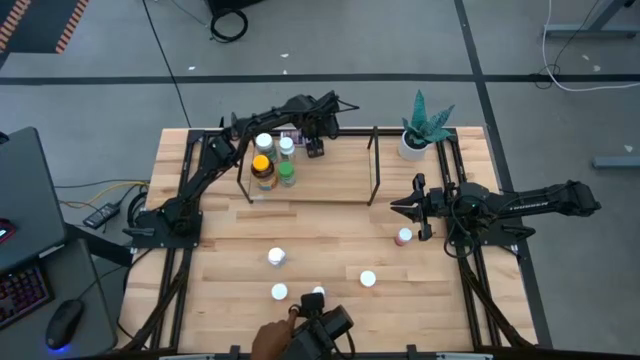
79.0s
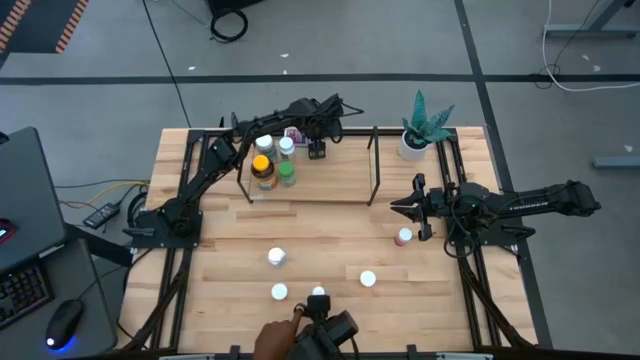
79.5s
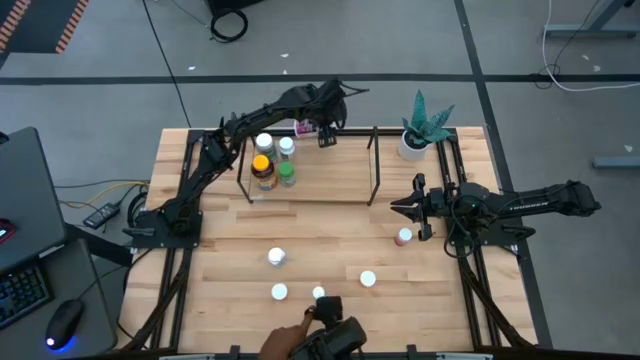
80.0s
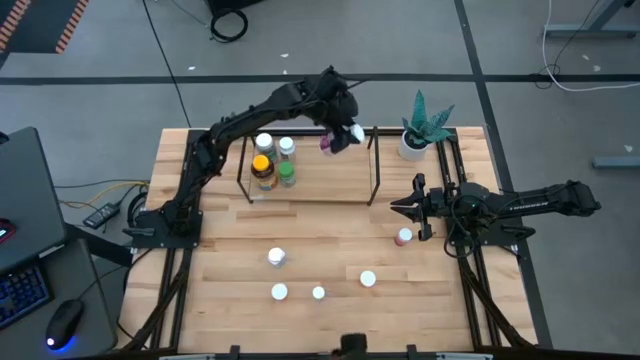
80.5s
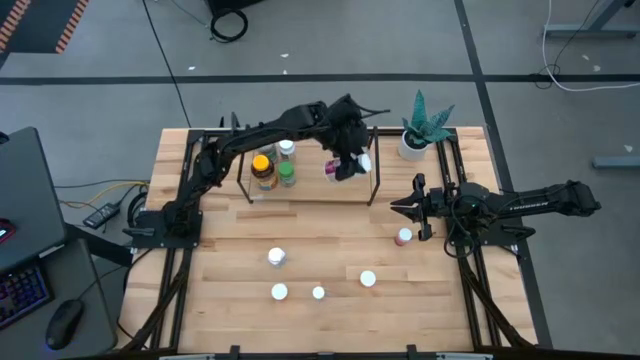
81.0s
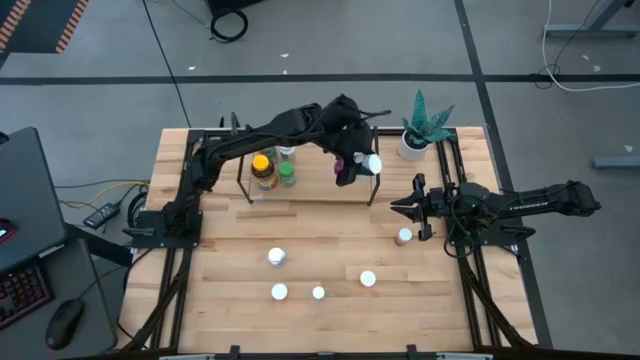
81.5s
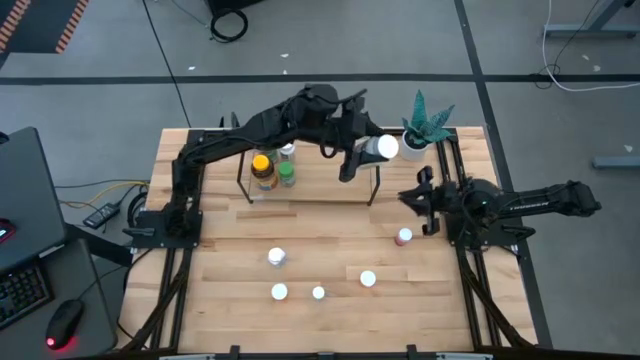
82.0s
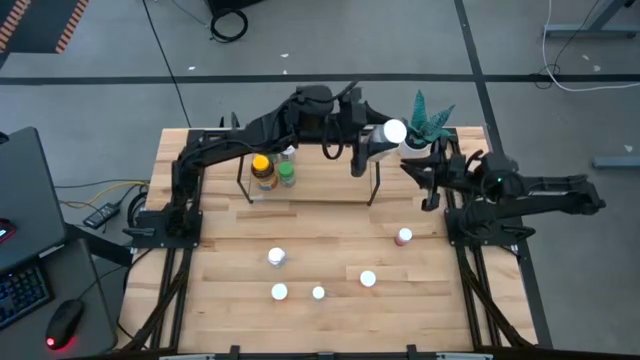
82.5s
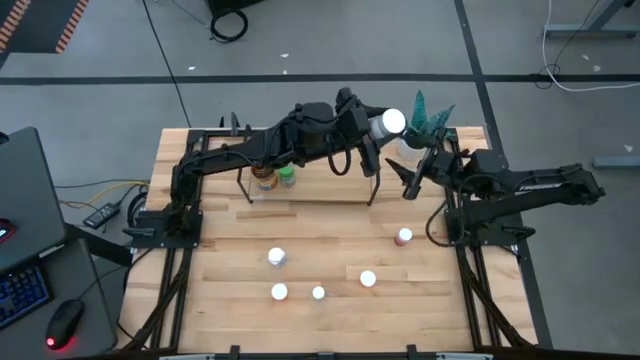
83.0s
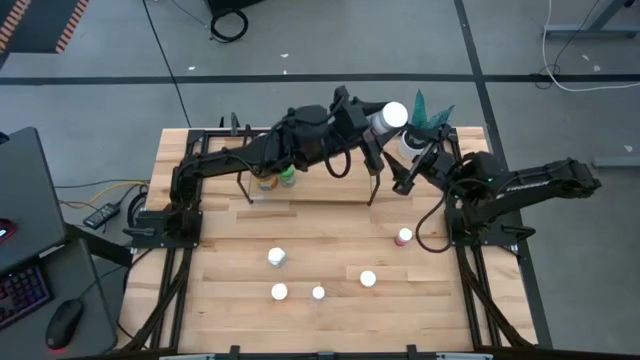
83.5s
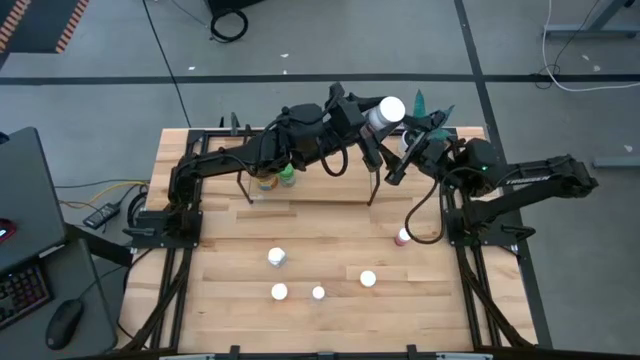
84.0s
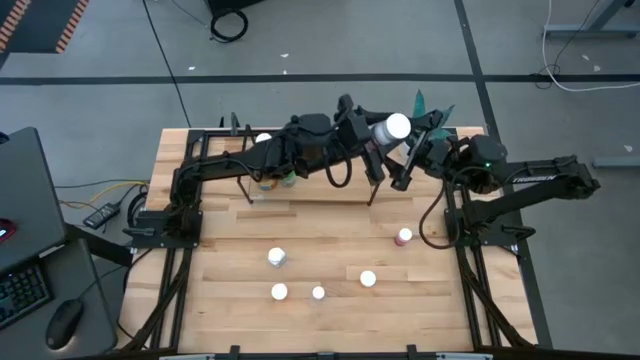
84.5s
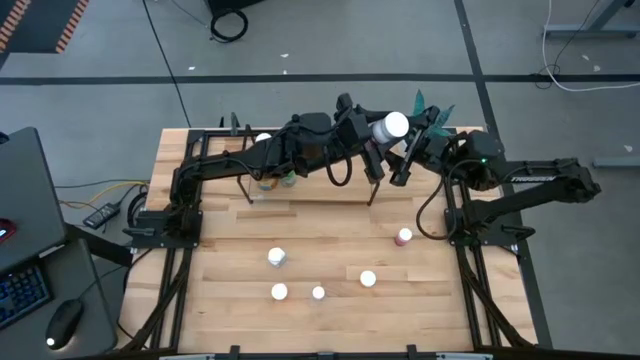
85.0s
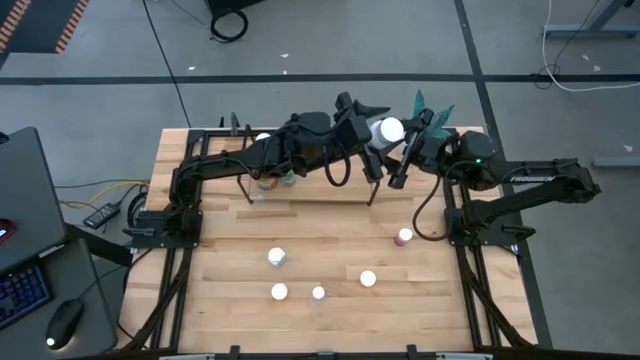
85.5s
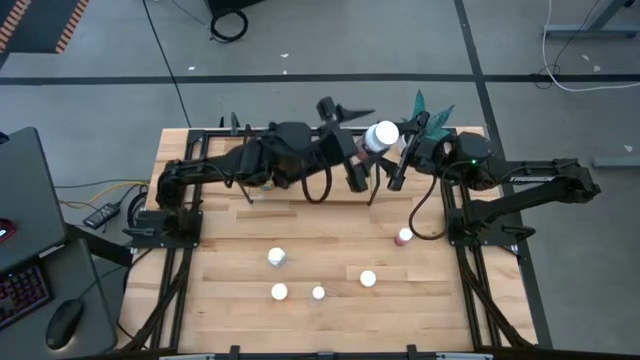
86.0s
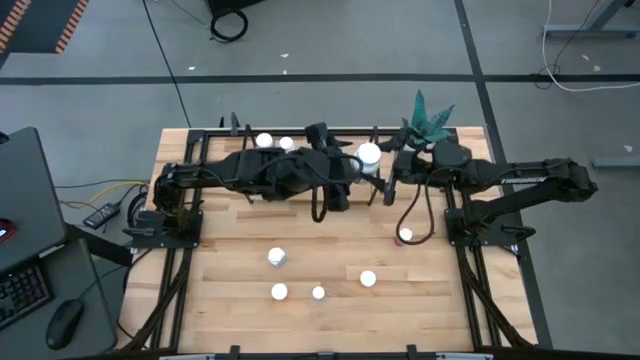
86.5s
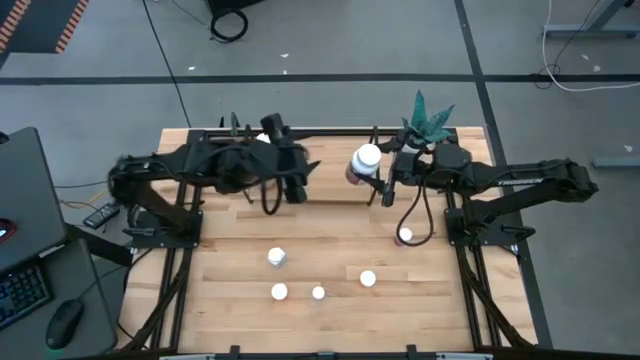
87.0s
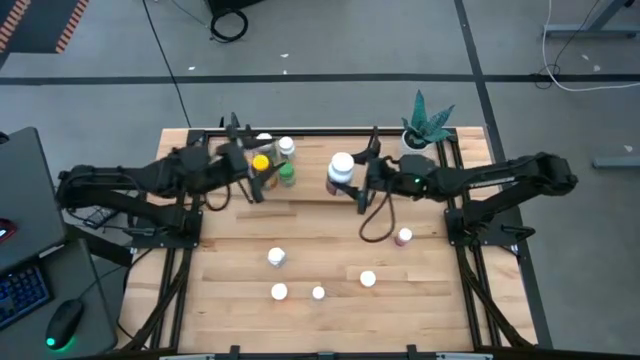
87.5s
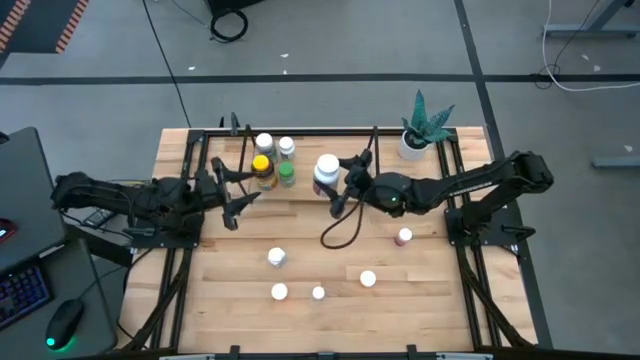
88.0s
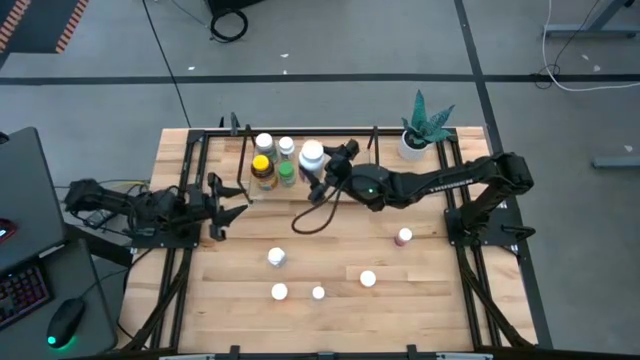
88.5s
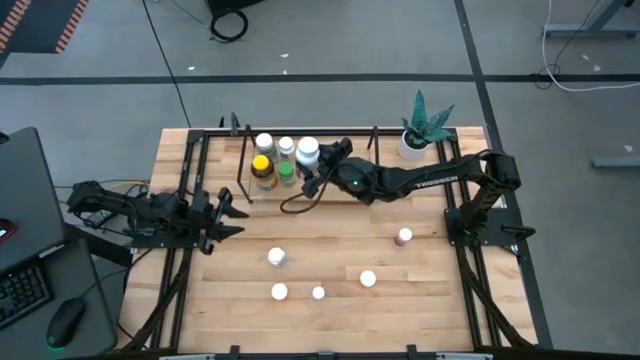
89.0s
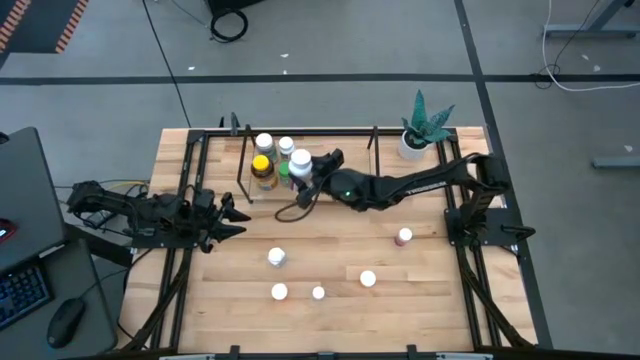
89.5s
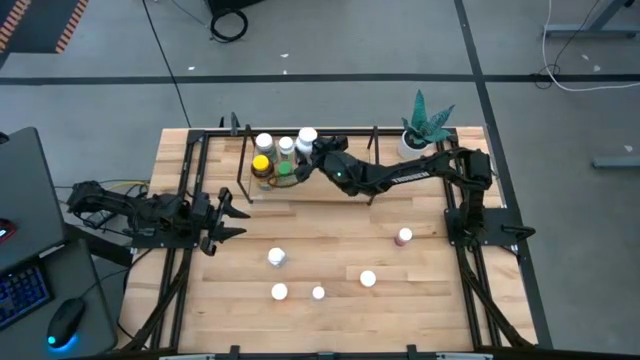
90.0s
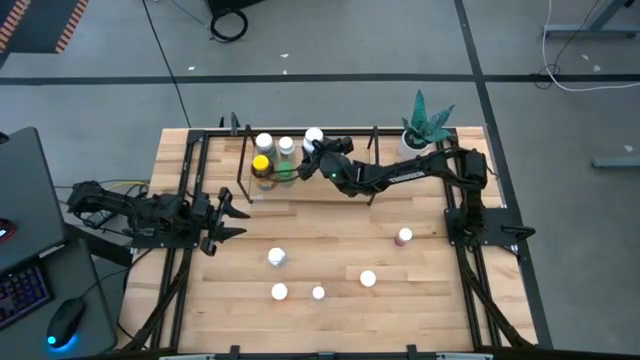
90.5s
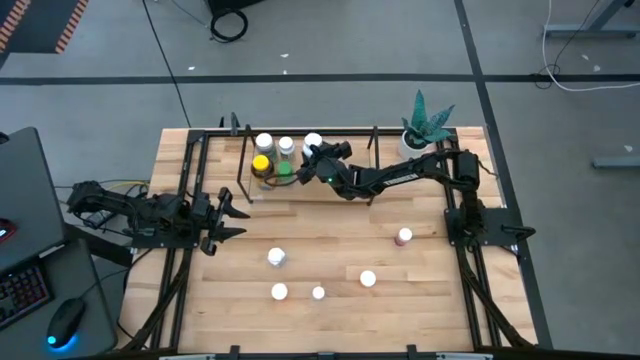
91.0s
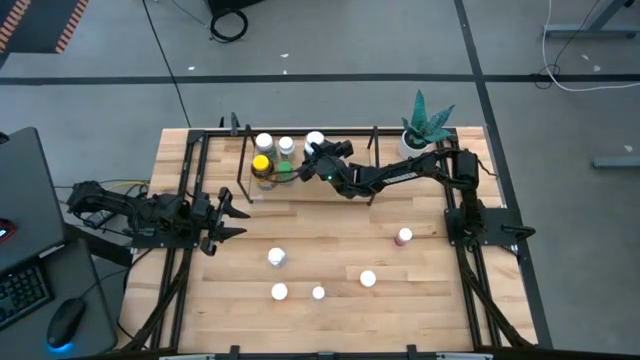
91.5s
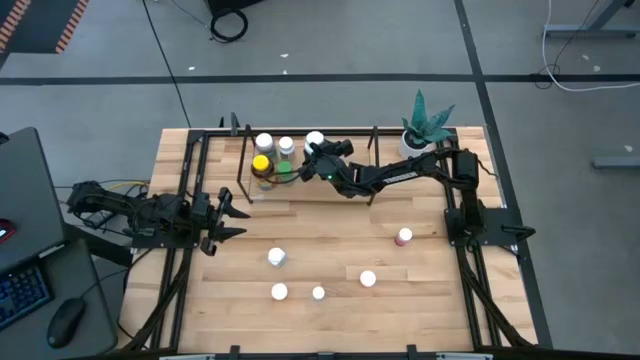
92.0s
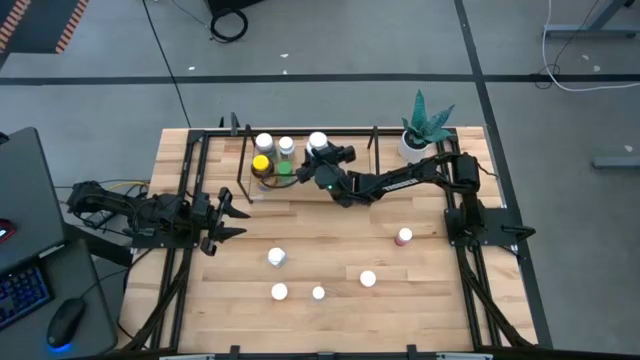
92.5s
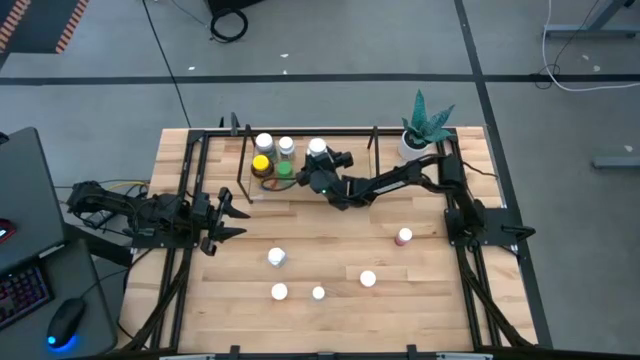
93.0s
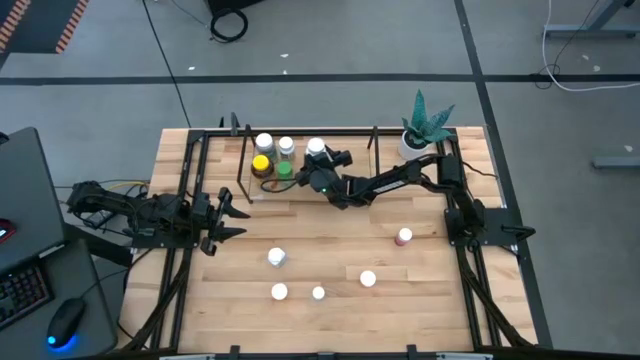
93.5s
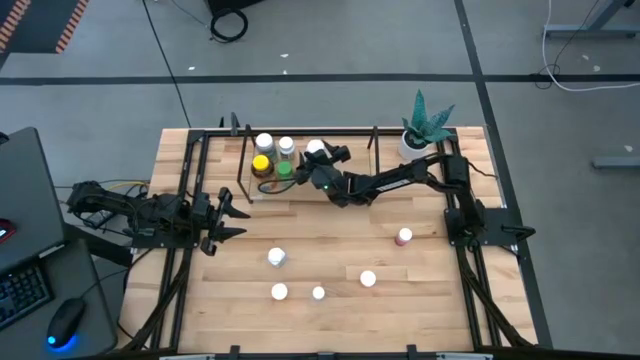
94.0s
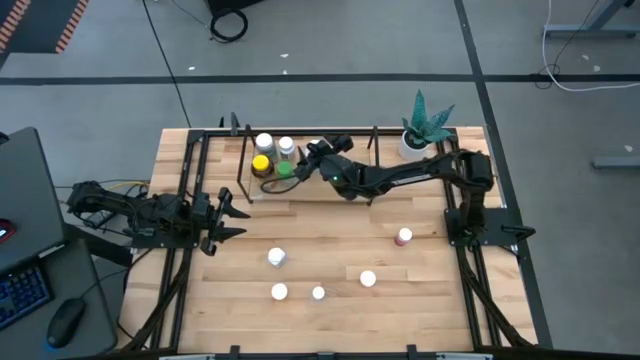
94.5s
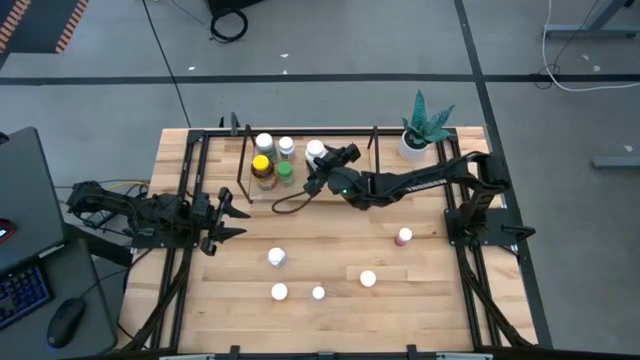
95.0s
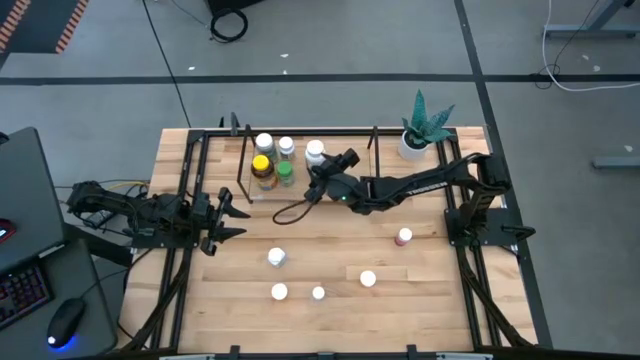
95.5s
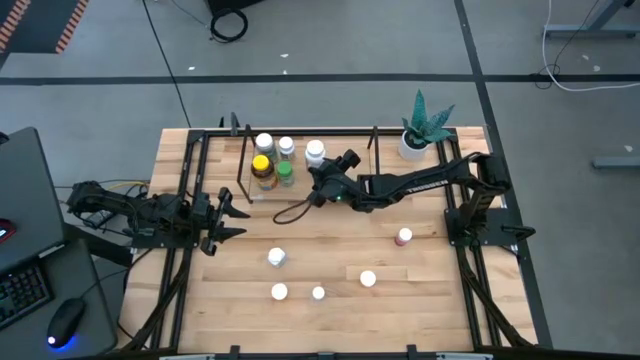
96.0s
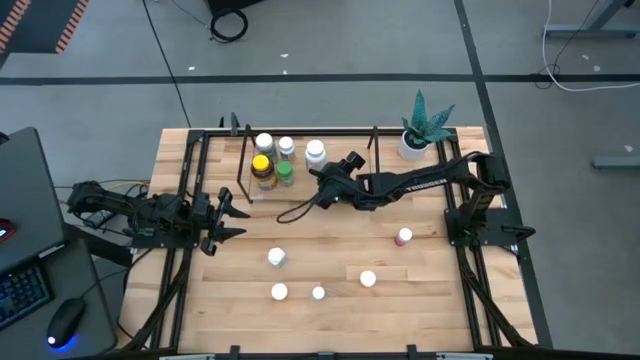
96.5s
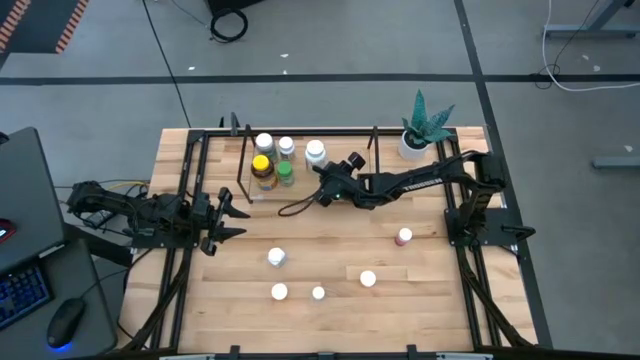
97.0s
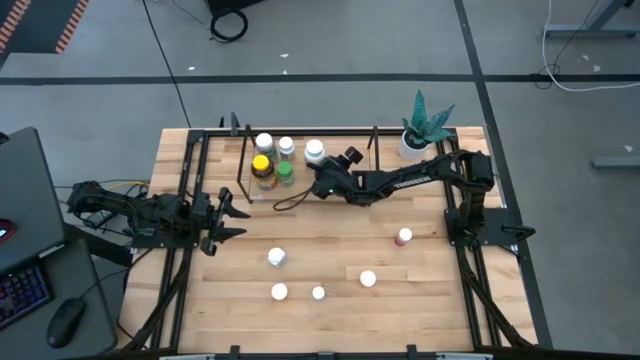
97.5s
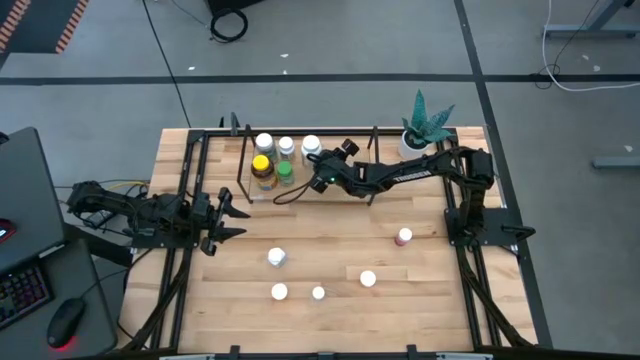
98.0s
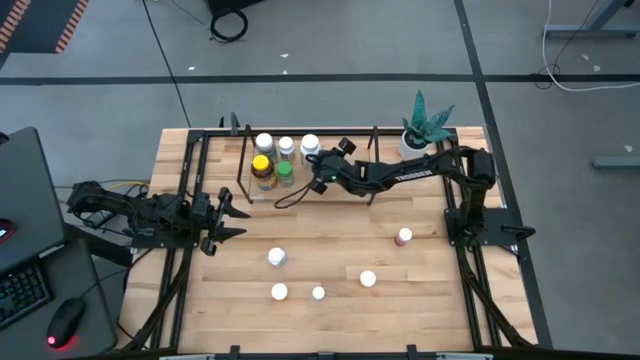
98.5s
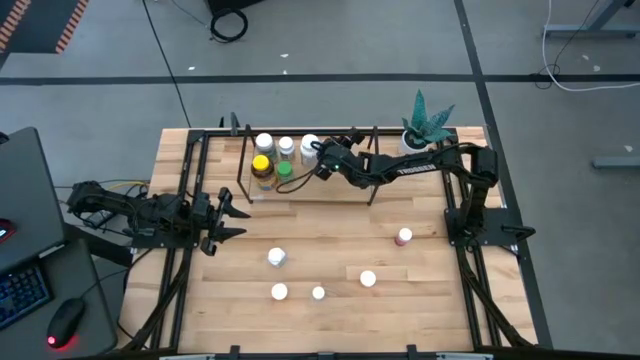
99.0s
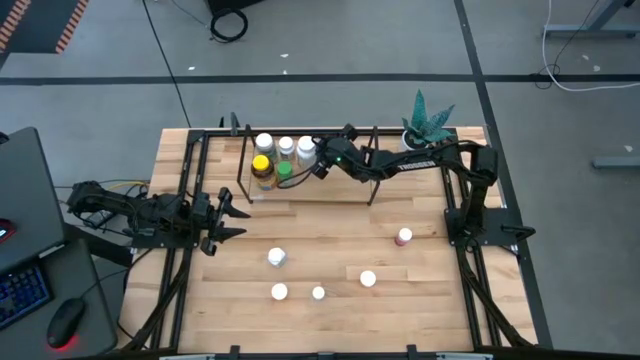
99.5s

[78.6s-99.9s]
Task: Pick and place medicine bottles onto shelf by color
Put the red pill bottle on the shelf
